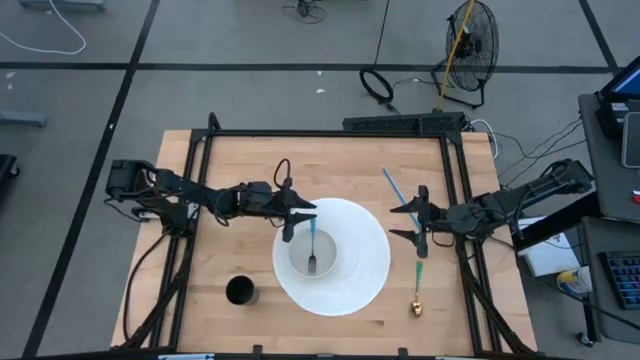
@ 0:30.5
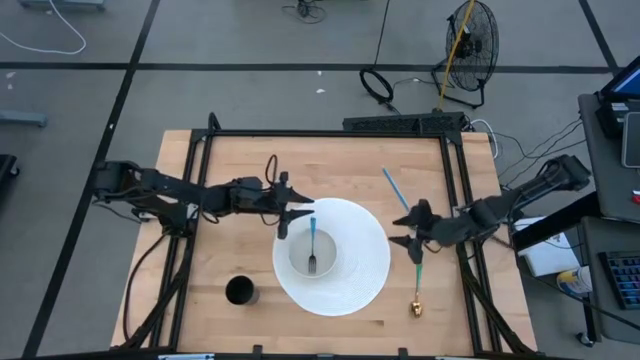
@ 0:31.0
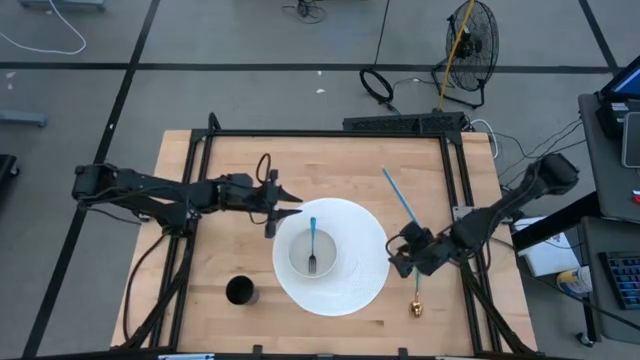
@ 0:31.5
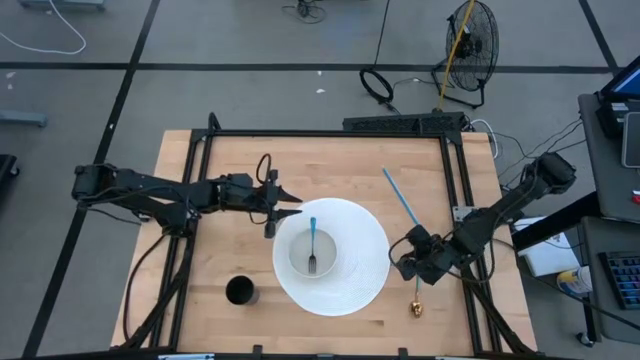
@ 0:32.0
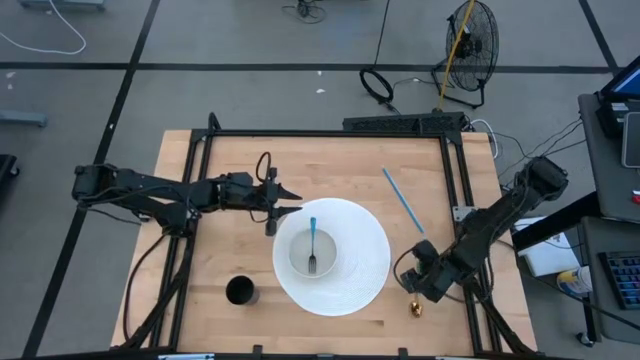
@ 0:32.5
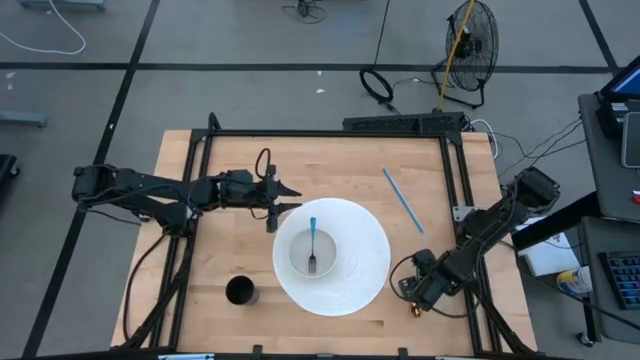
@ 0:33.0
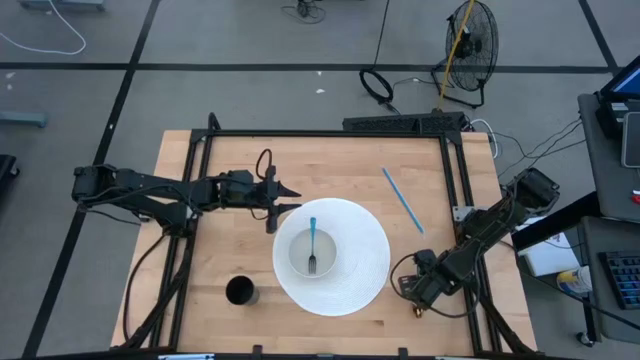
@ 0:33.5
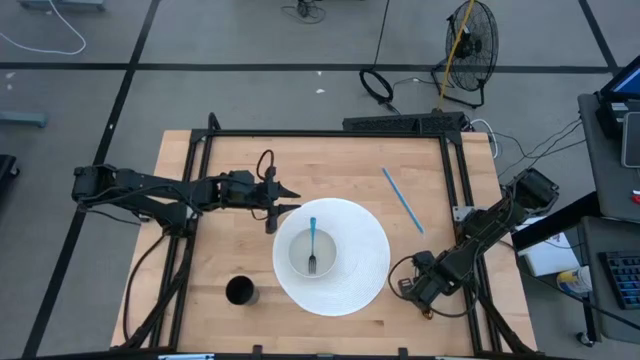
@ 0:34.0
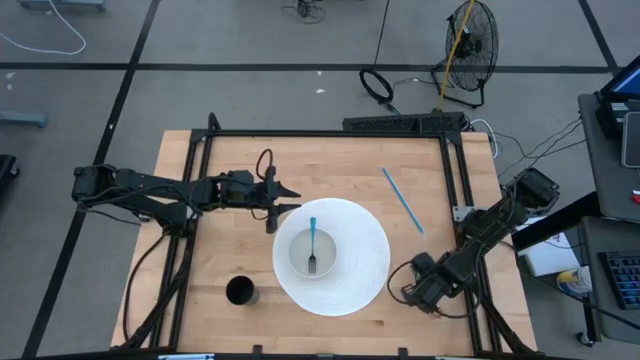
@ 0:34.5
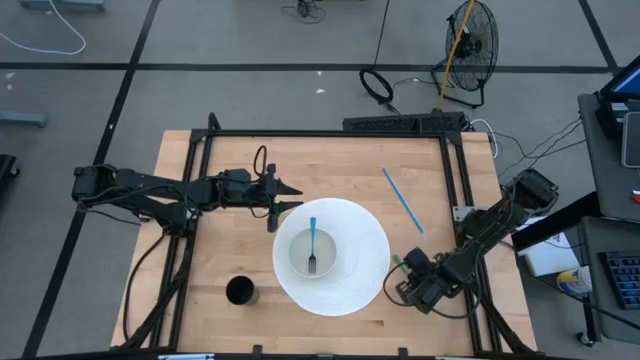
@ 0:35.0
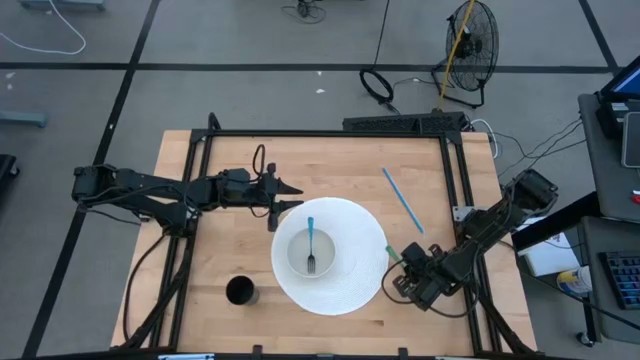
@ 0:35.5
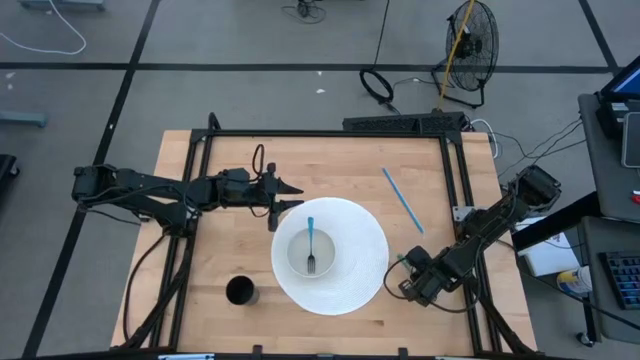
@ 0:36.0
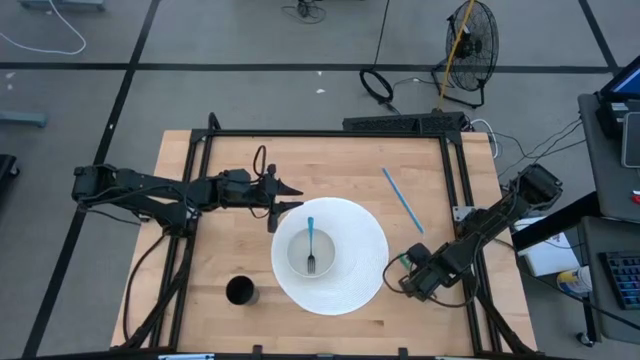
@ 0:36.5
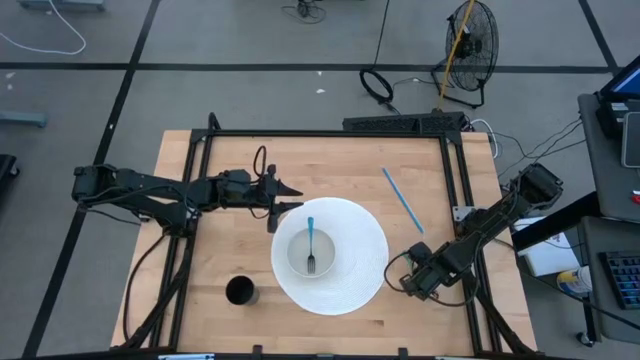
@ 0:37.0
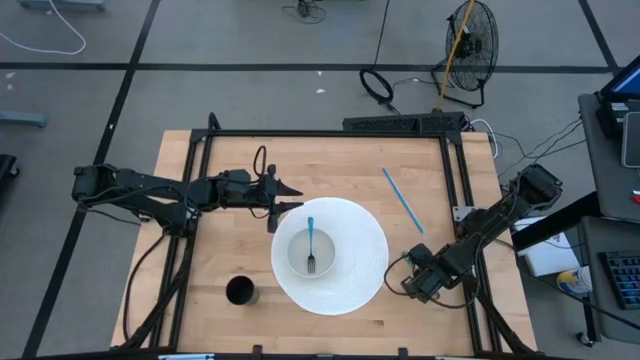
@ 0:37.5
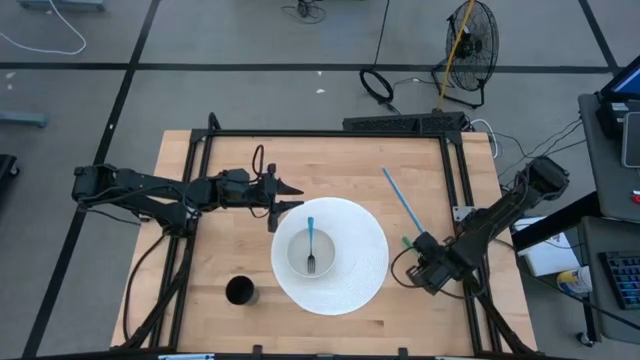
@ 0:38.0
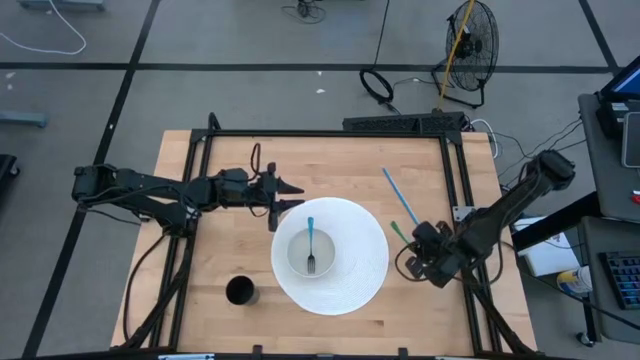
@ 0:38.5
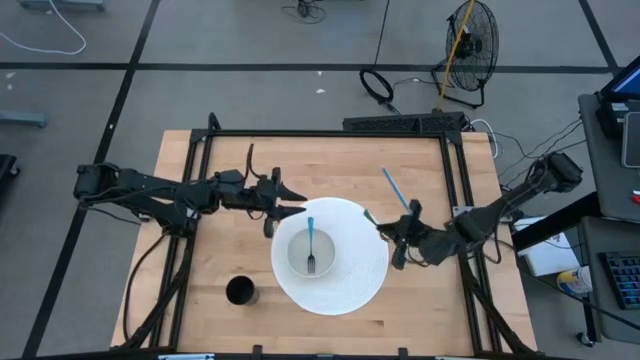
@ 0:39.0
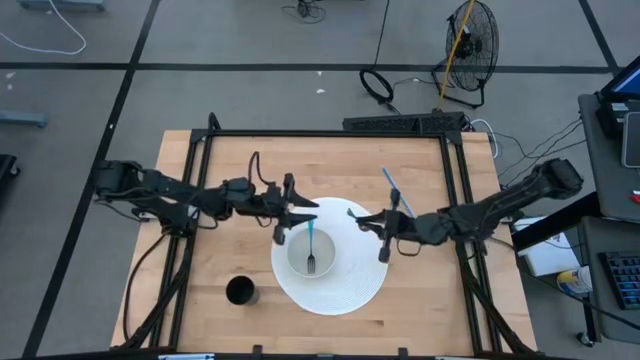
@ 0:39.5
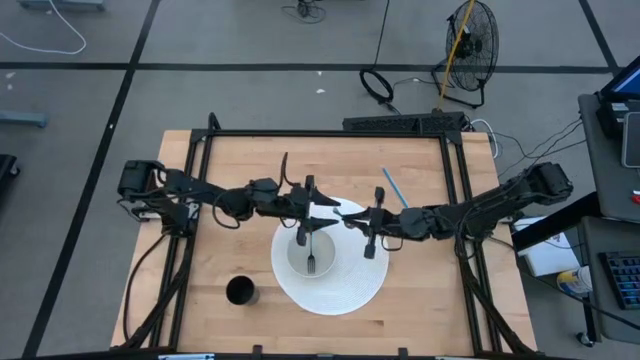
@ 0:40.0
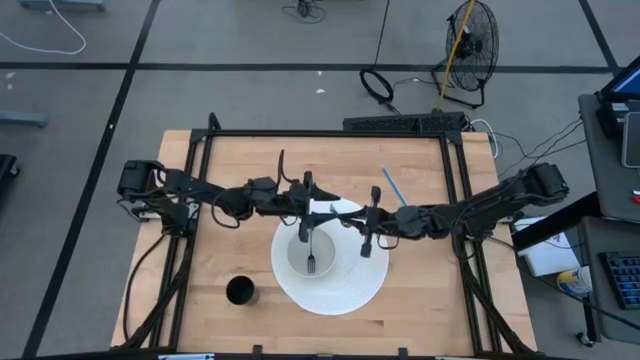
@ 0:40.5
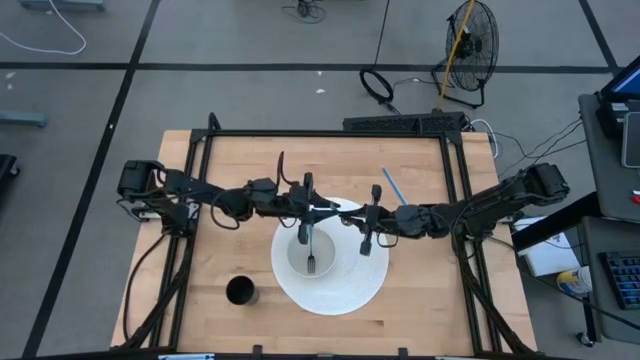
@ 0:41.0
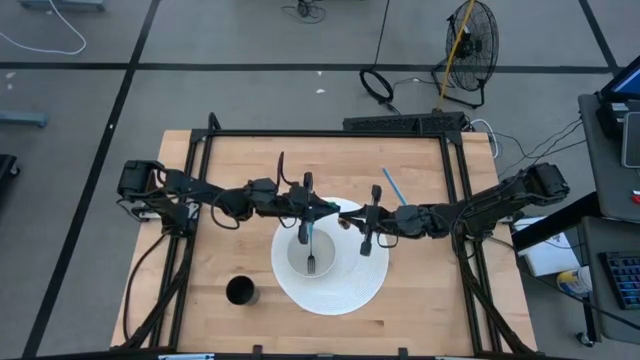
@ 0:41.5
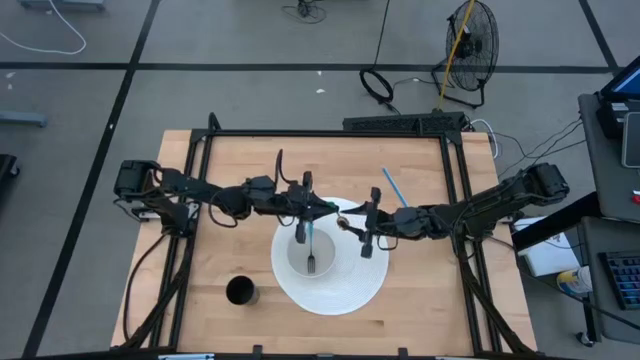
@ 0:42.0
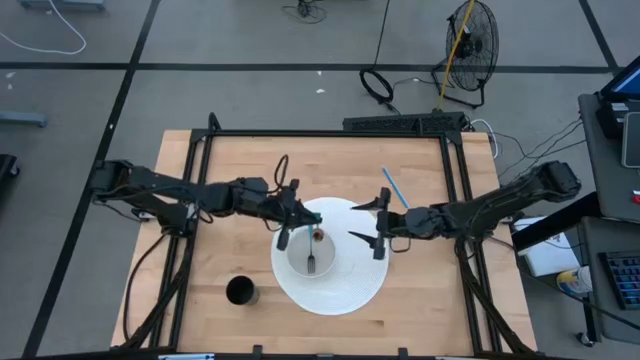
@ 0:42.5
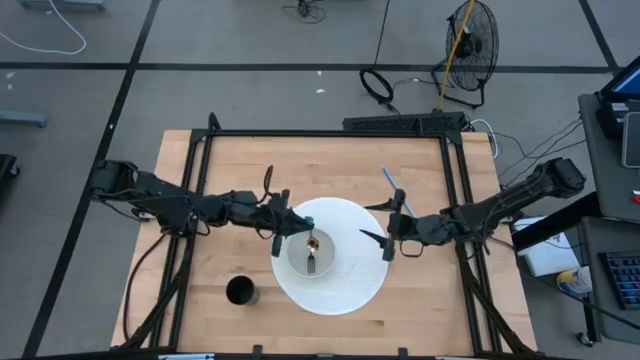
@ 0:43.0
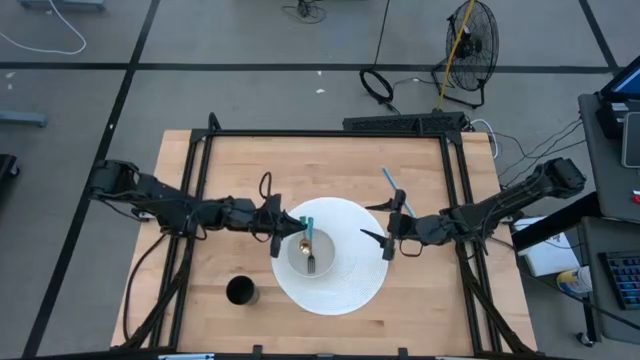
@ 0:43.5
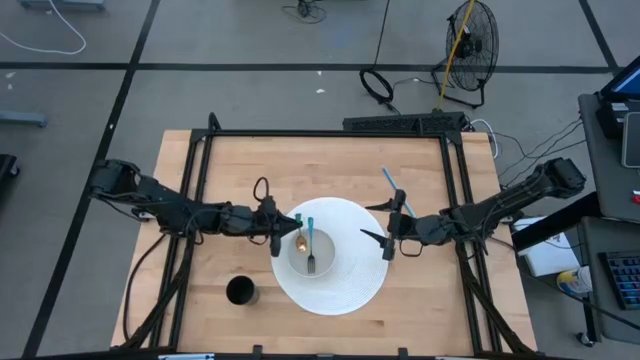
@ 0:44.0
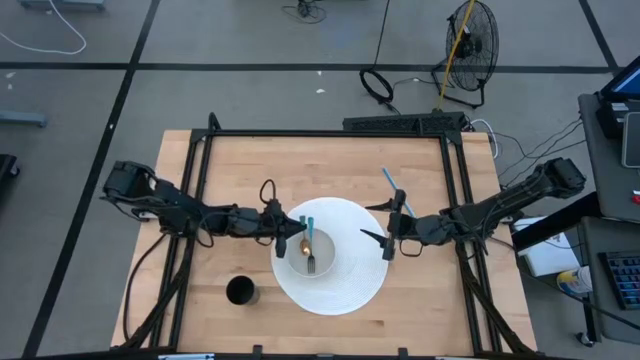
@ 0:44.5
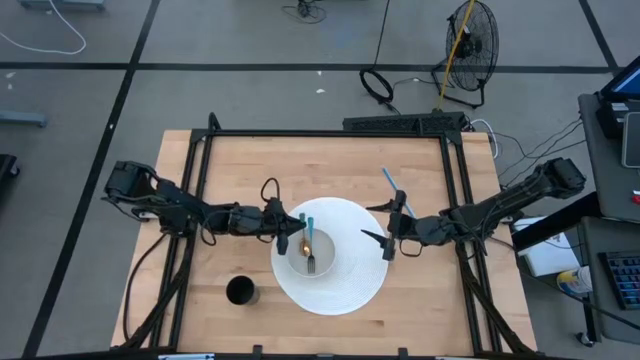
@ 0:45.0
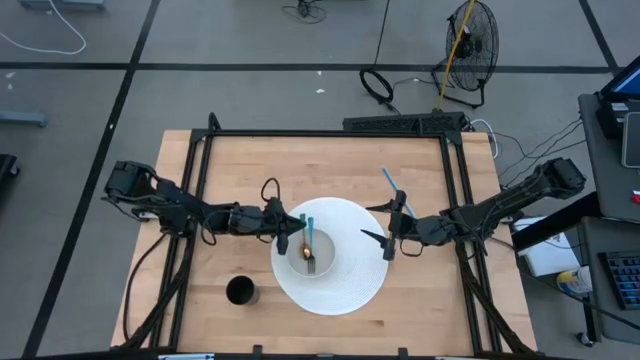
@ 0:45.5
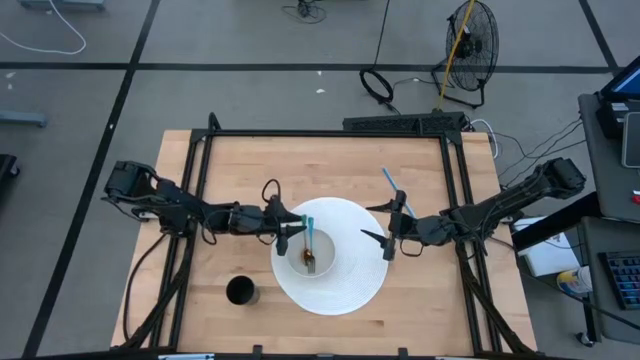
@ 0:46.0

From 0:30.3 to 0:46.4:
Task: Pick & Place Utensil
Put the green spoon into the white bowl to the left of the blue fork

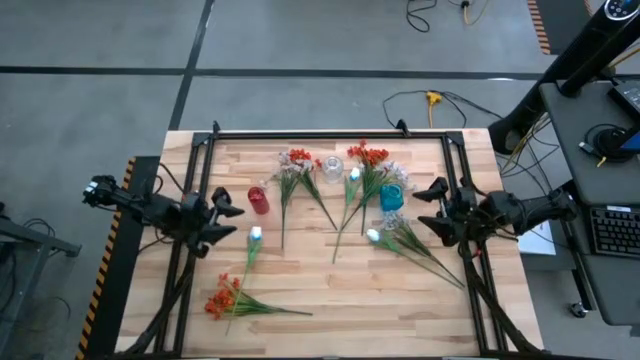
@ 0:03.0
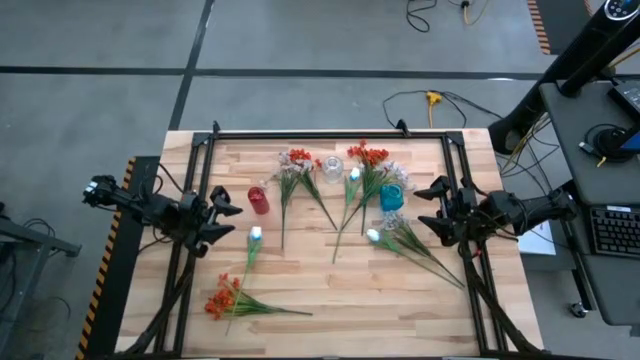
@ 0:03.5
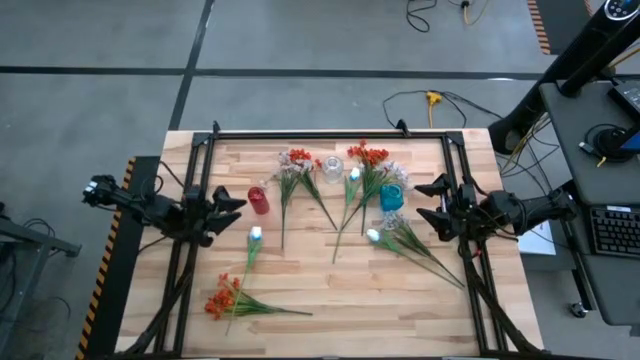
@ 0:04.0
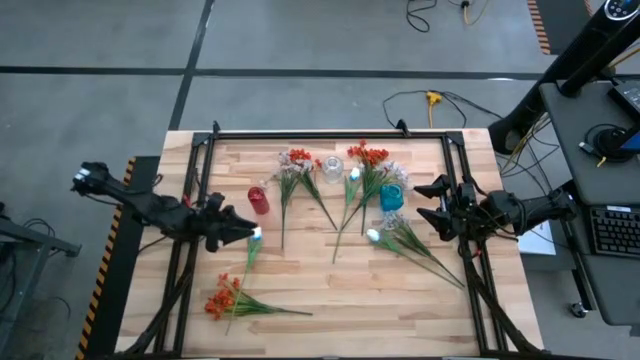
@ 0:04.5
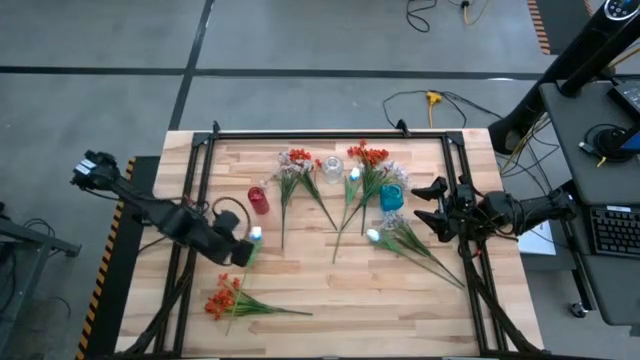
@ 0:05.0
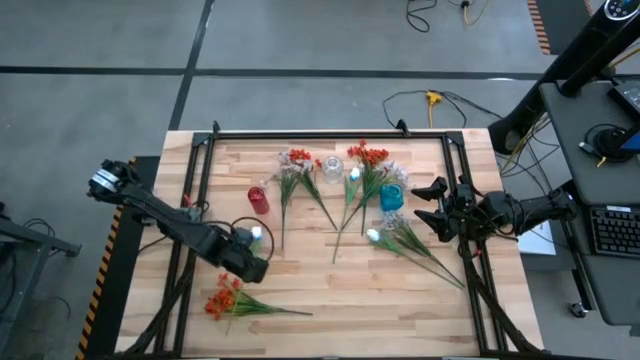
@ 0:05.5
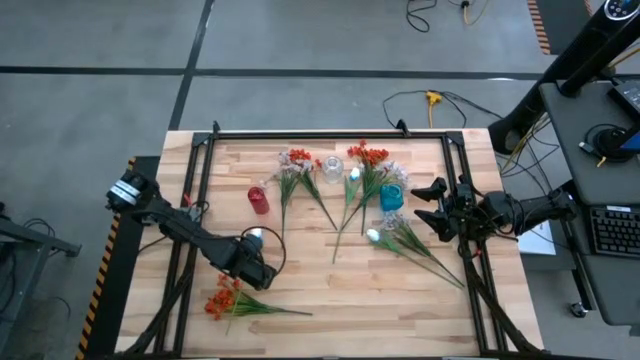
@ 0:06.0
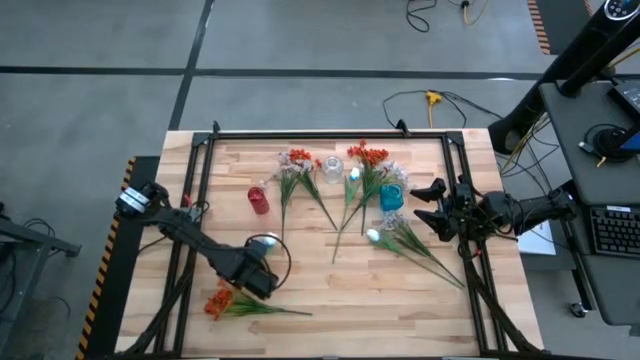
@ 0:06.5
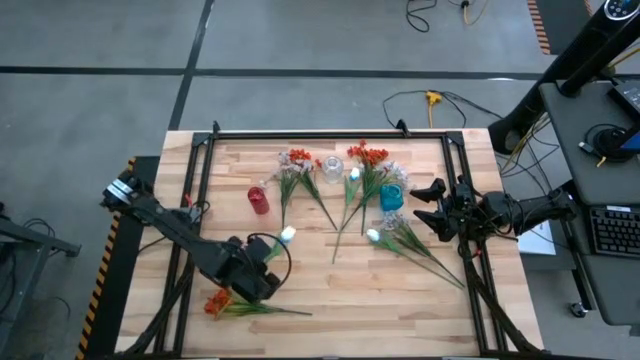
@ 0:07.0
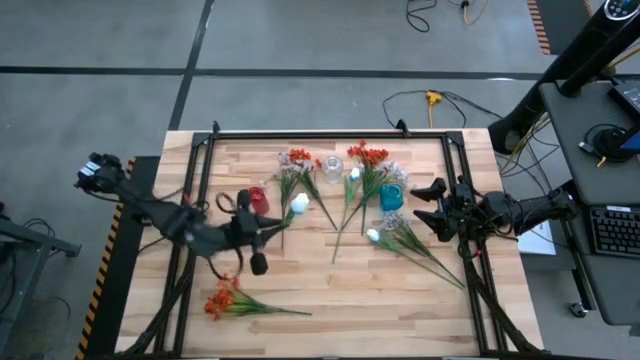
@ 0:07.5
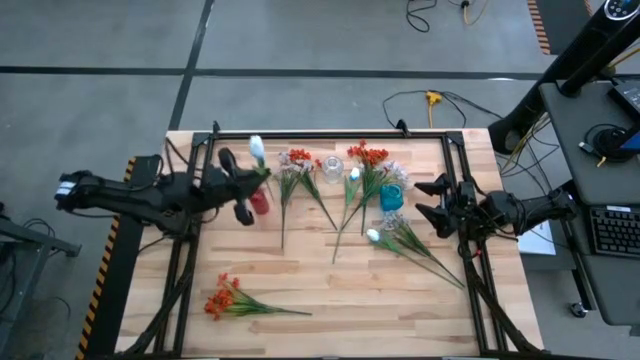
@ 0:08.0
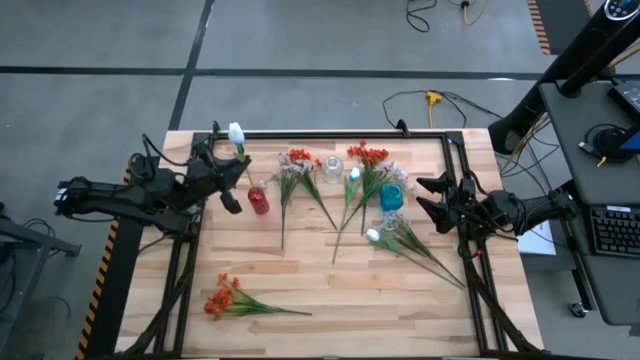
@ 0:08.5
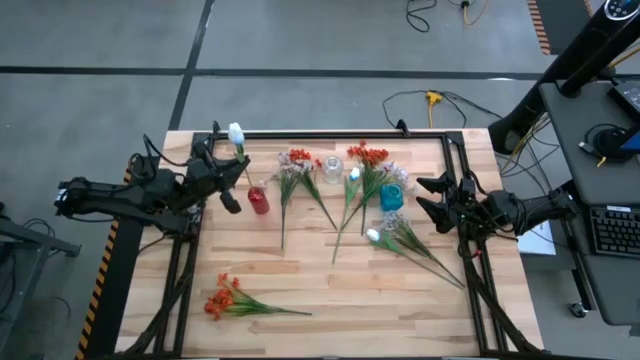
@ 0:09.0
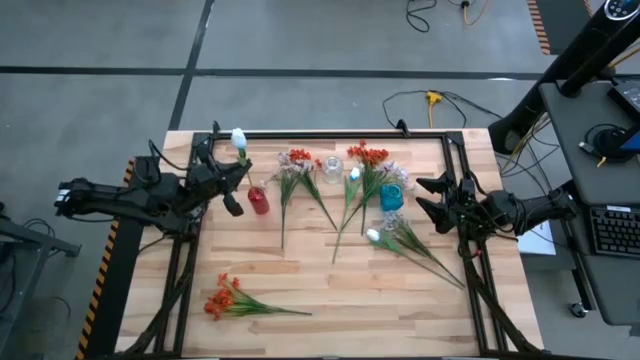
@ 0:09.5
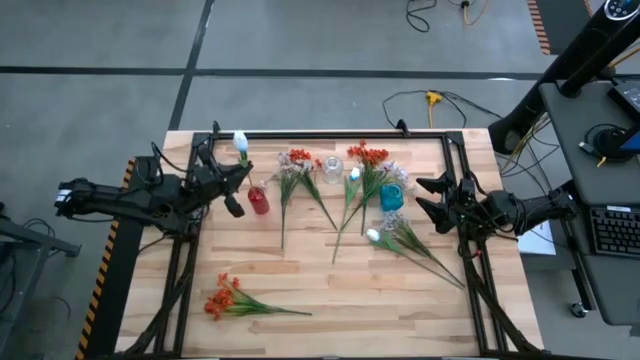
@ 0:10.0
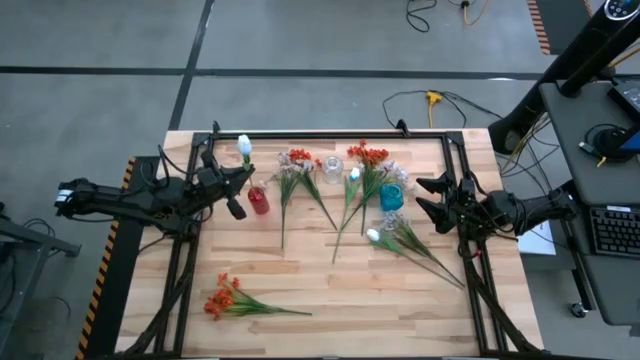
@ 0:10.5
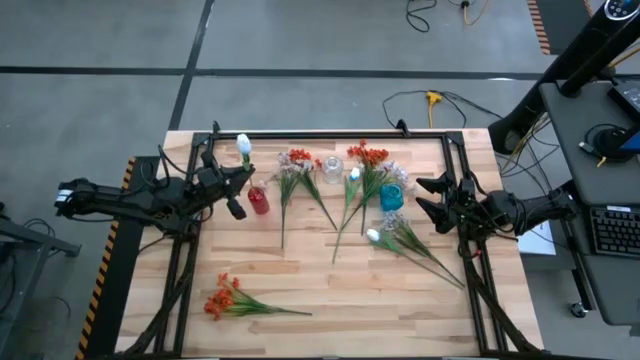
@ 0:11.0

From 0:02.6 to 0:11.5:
Task: Sort flowers into vase by color
Put the bottom left white flower into the red vase
